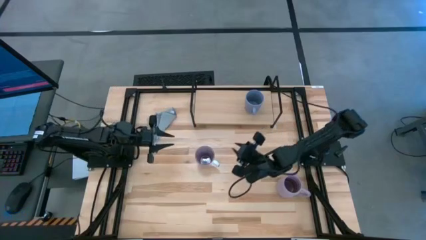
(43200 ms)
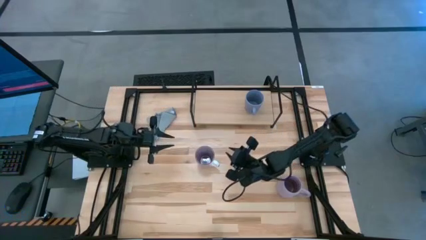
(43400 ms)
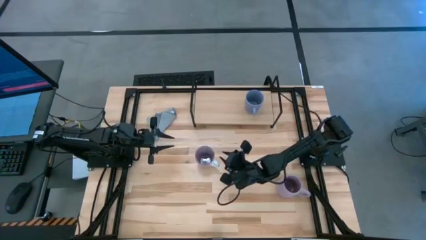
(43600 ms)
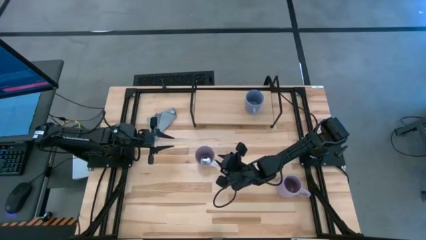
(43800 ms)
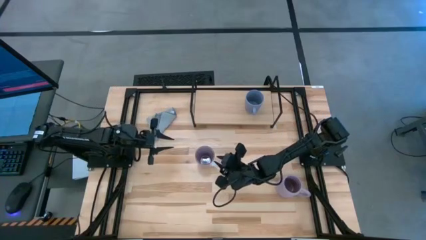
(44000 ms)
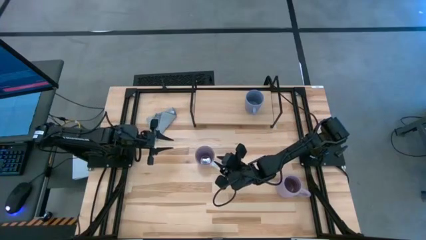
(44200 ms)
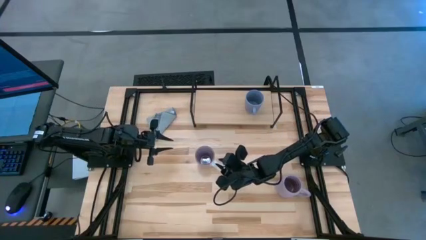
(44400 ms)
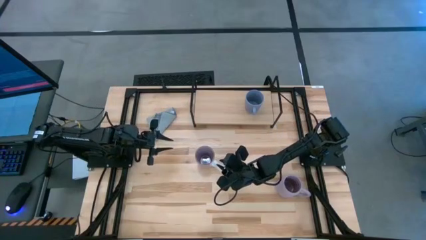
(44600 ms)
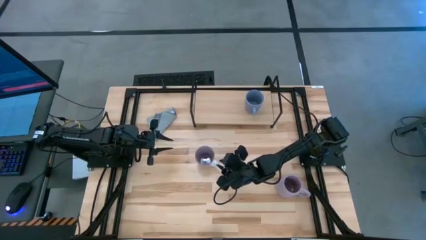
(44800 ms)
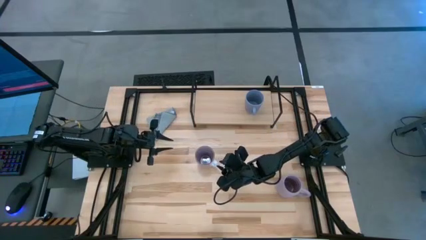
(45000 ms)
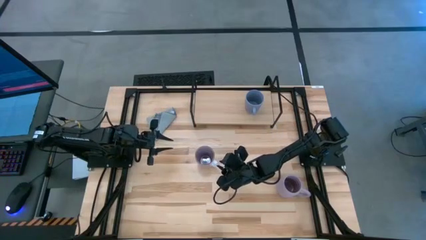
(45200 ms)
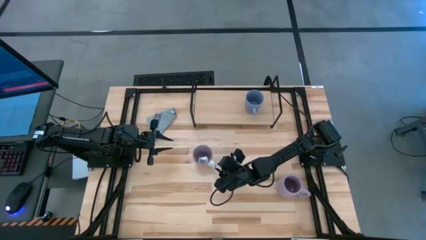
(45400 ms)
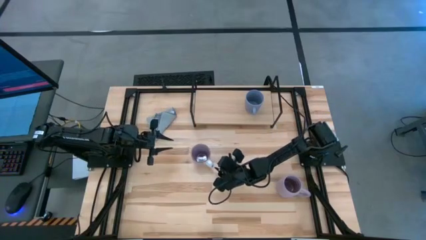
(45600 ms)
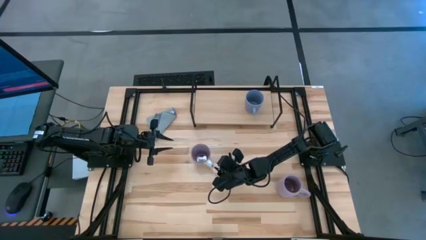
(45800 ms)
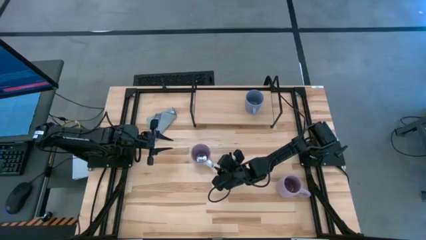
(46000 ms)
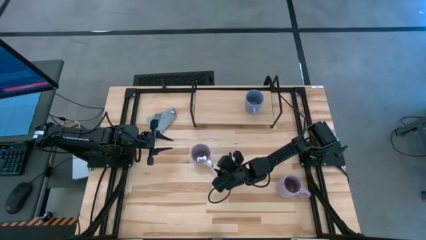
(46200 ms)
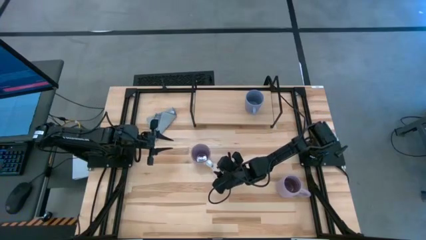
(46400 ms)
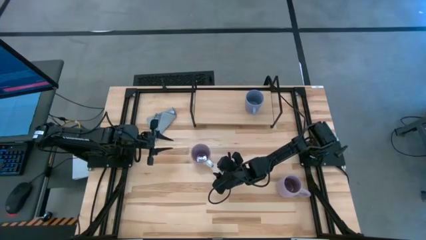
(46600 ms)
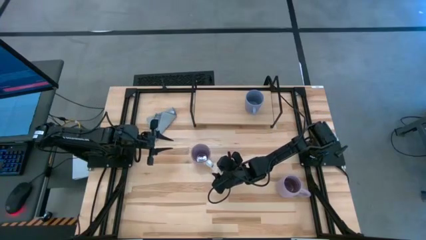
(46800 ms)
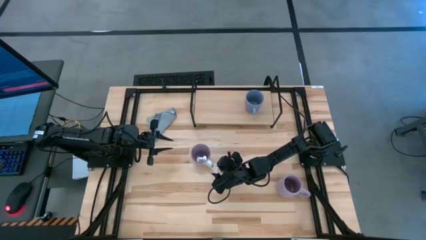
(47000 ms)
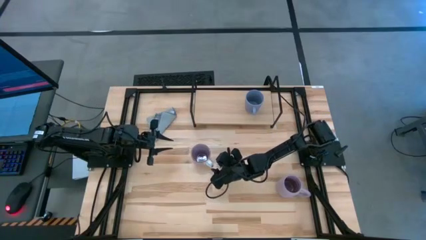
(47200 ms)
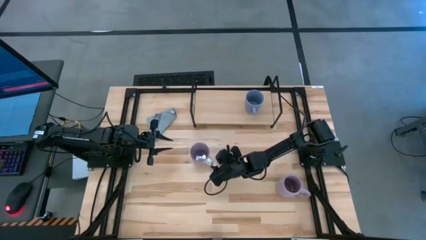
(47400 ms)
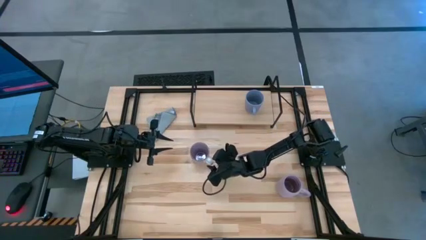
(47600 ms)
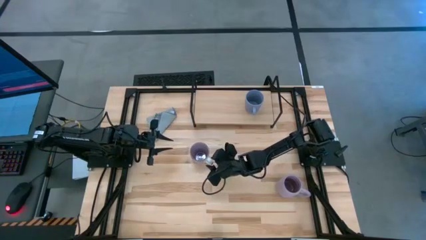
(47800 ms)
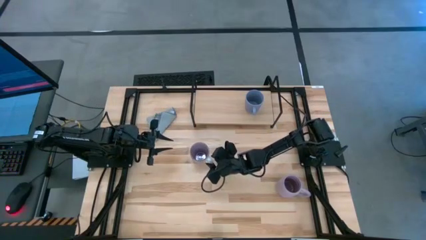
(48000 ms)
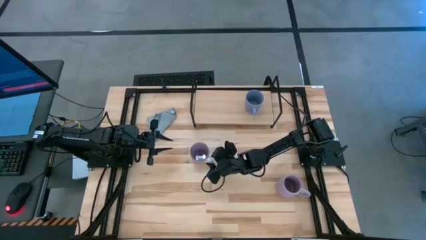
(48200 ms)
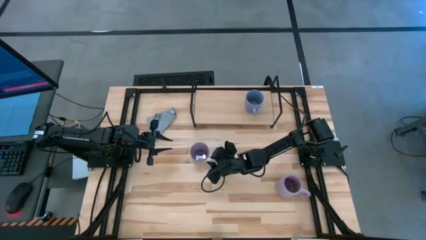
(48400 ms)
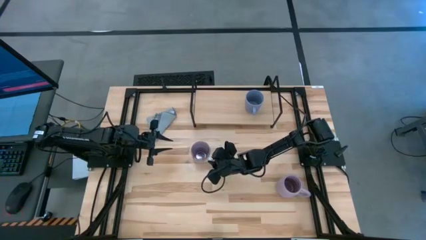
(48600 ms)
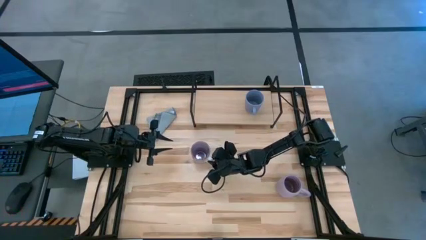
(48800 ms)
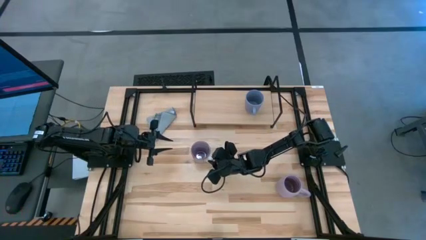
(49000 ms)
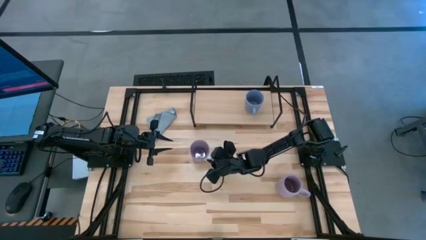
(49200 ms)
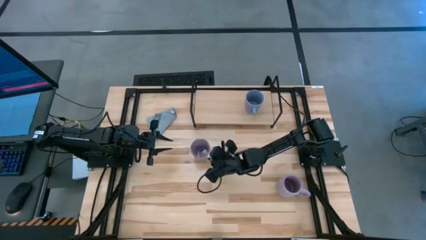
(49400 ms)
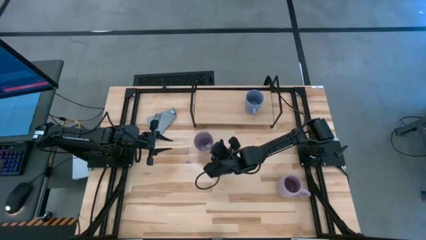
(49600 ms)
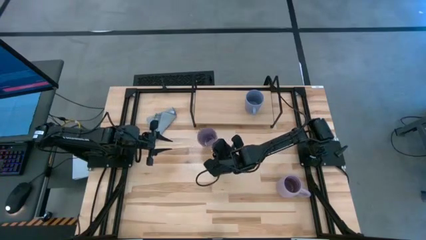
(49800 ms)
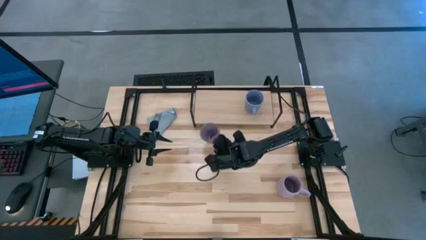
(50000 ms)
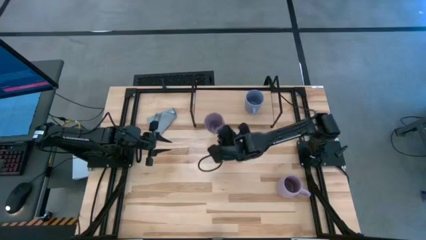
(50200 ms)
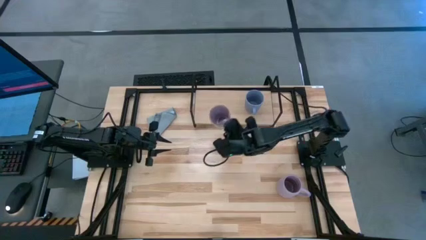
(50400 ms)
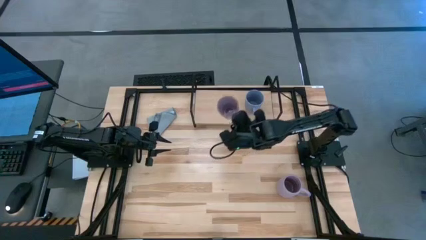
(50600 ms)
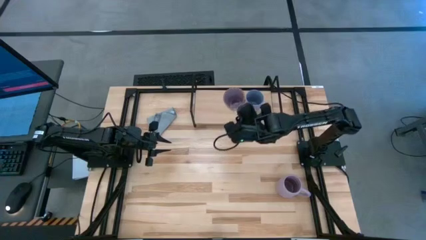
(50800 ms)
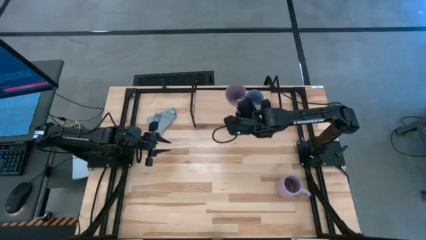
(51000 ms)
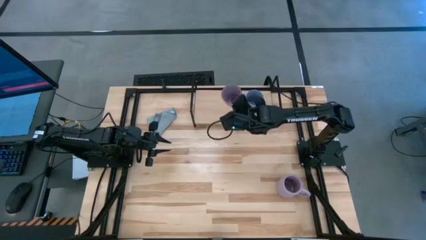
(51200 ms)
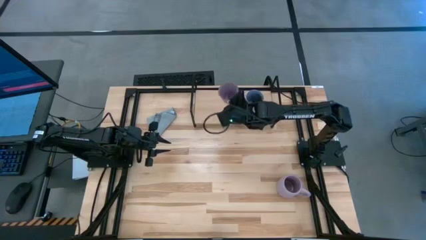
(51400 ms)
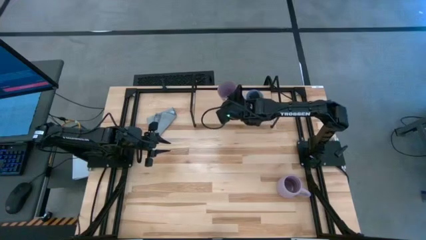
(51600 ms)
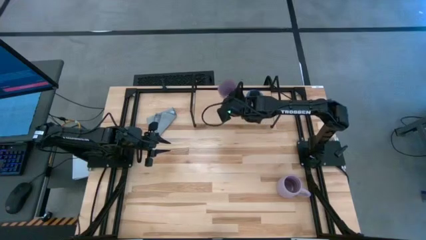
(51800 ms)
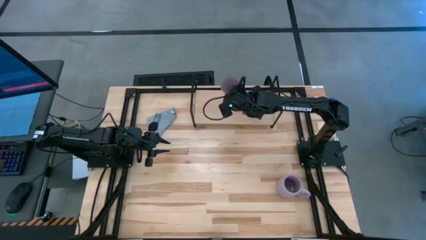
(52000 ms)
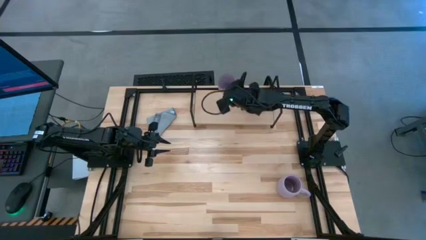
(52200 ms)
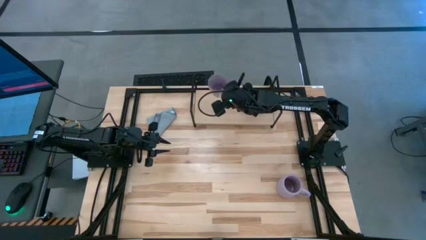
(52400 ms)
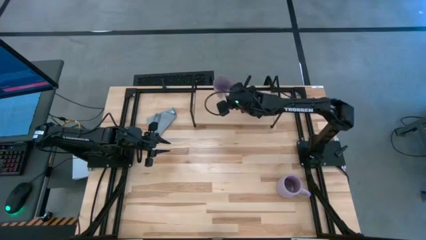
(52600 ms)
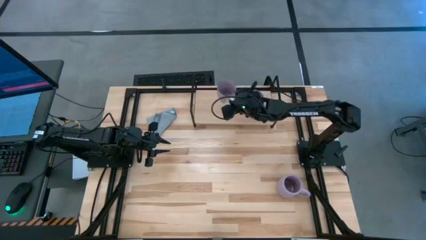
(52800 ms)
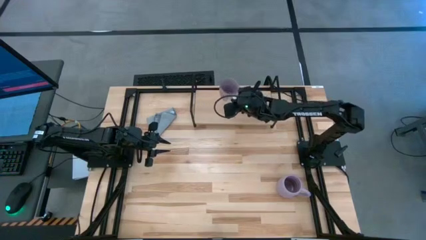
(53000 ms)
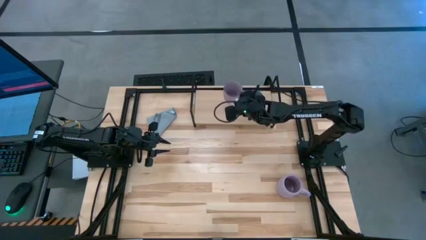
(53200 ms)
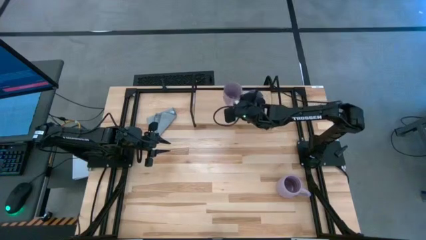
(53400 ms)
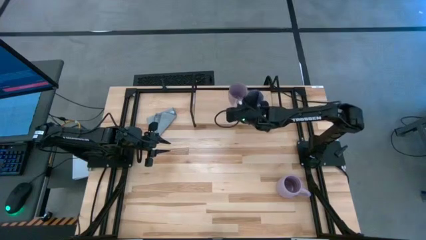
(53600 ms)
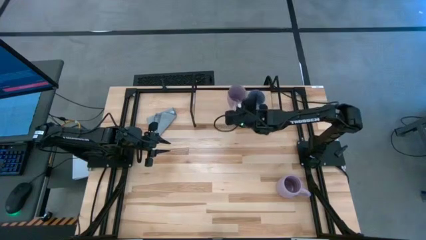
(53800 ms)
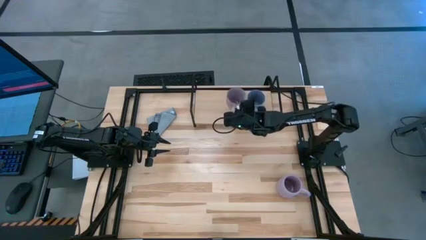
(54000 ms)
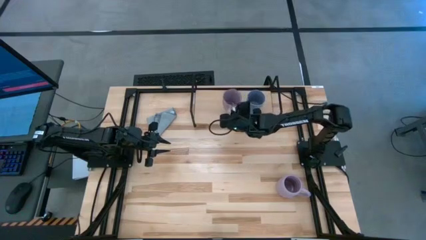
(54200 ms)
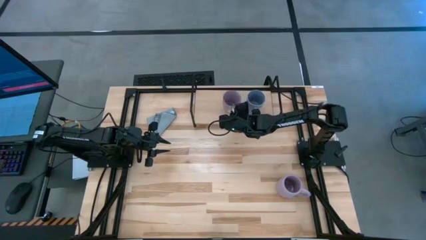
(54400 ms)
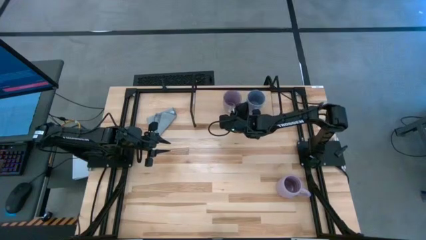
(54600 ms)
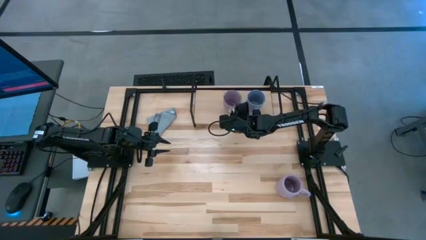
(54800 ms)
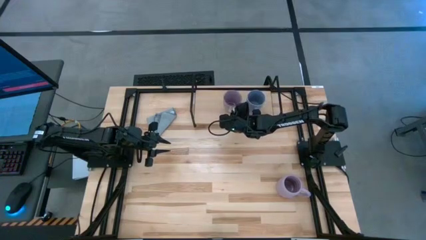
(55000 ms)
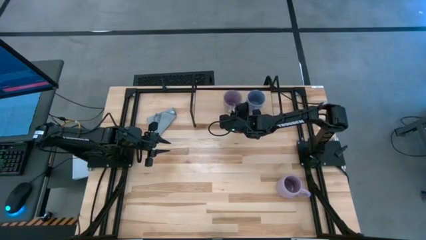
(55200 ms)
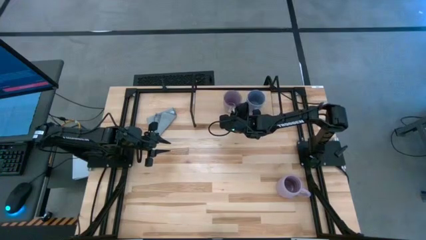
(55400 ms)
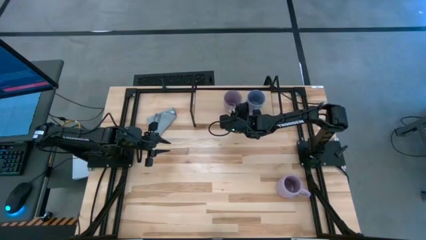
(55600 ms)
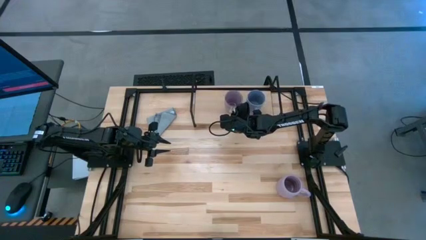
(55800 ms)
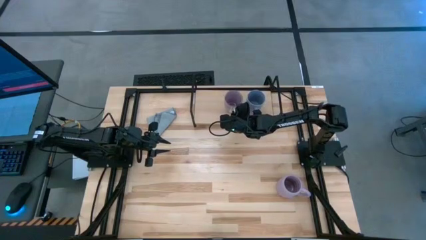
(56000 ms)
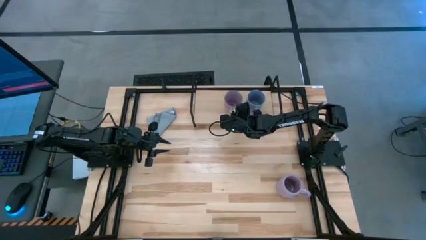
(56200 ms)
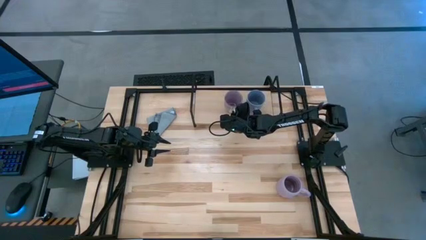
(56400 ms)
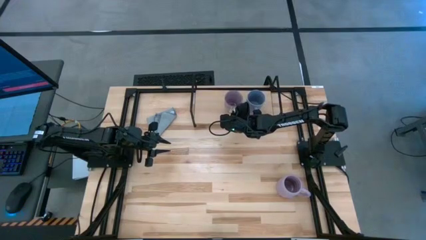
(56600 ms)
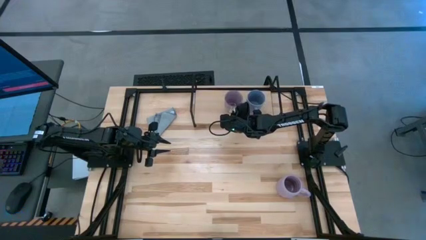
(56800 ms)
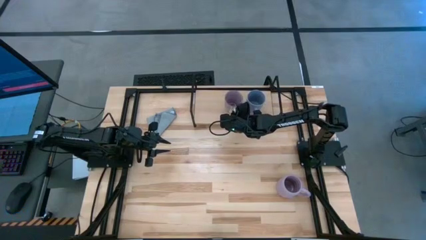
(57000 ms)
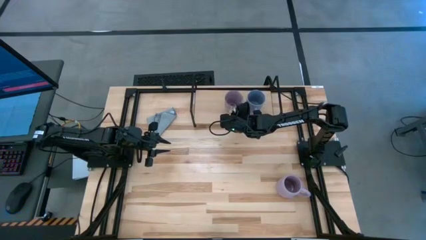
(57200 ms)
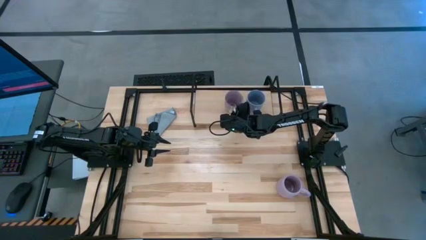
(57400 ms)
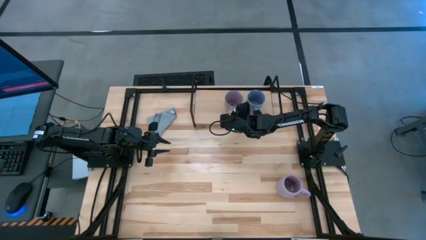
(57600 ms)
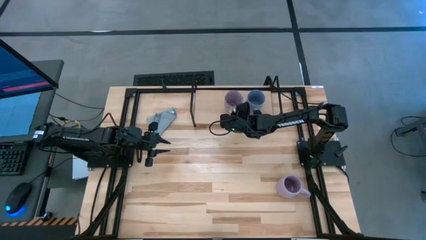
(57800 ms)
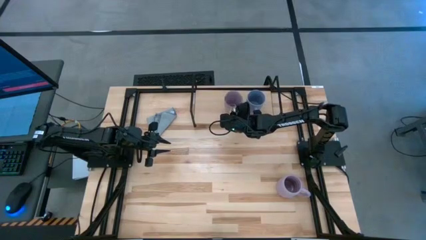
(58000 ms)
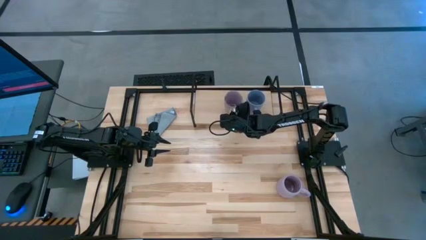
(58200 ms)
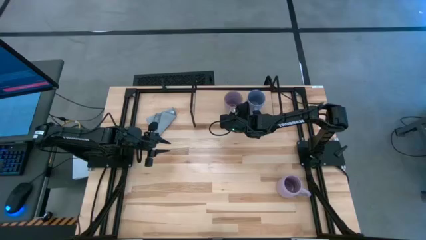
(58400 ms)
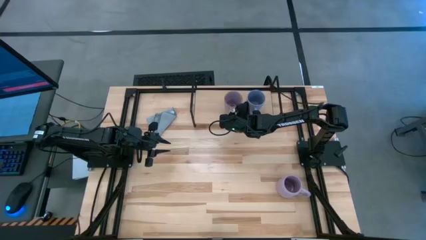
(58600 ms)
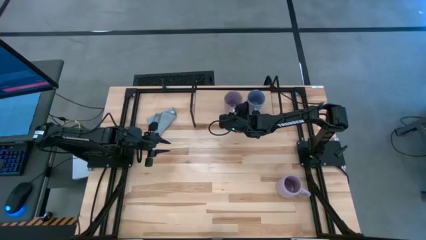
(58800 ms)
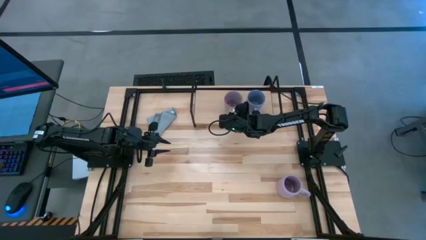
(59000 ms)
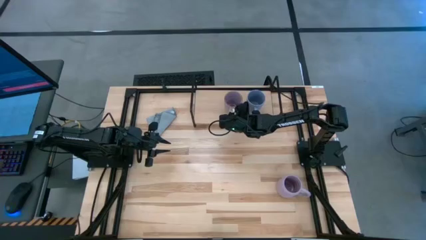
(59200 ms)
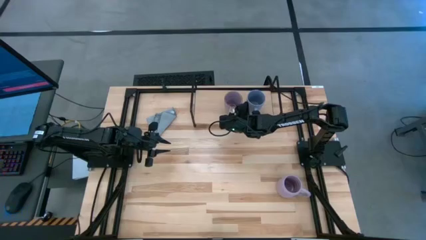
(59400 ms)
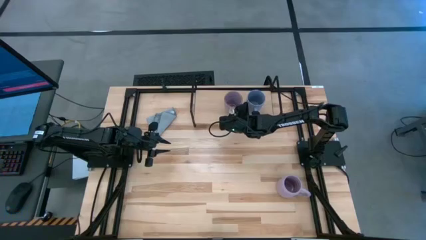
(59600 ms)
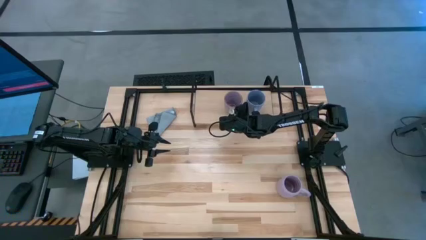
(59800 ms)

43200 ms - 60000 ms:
Task: Stack small to large cups/mugs on shelf
Put the left purple cup on the shelf
